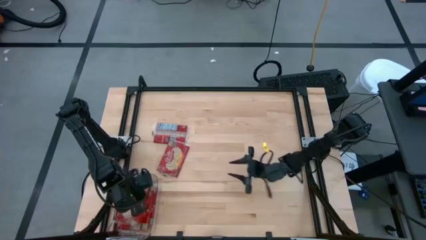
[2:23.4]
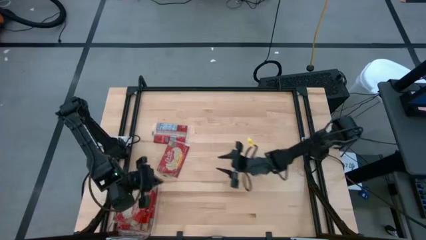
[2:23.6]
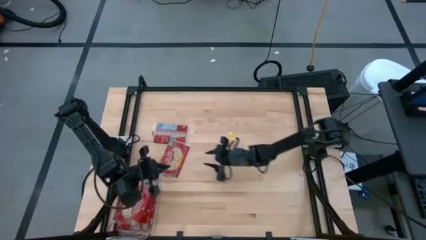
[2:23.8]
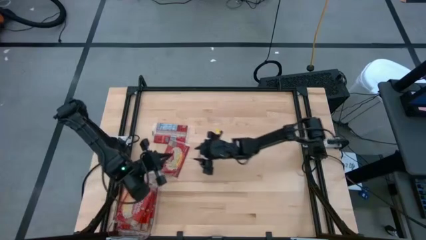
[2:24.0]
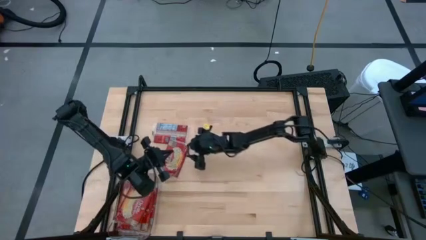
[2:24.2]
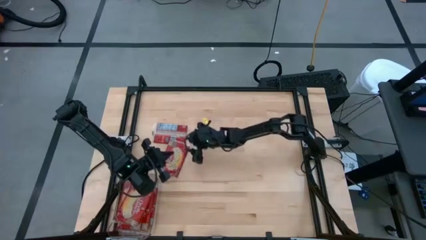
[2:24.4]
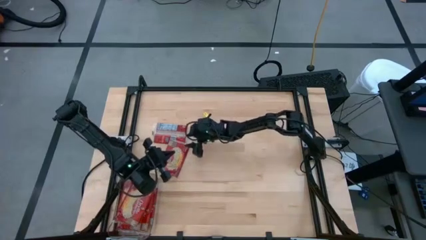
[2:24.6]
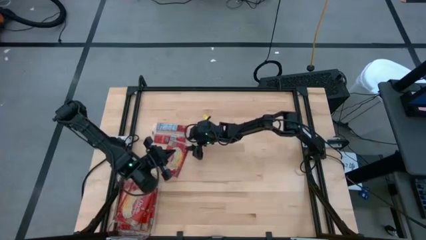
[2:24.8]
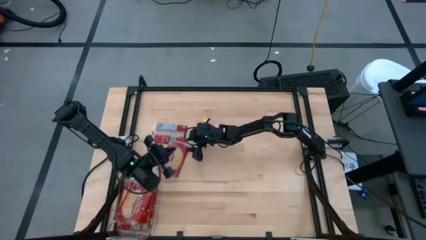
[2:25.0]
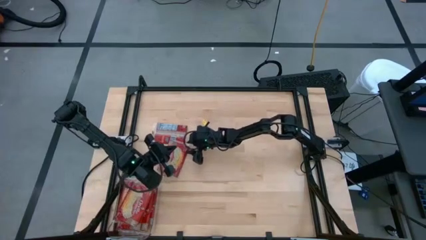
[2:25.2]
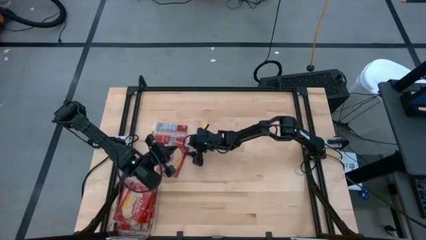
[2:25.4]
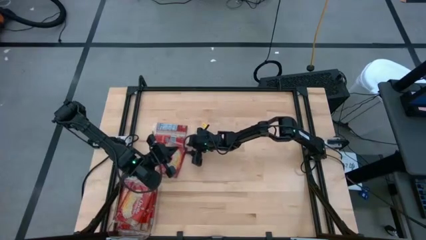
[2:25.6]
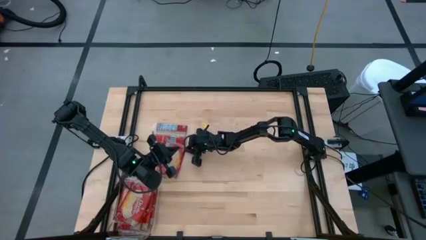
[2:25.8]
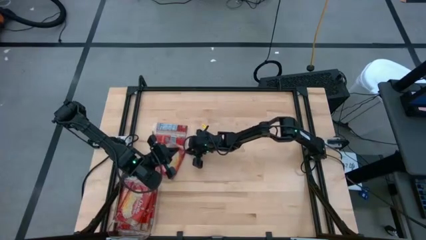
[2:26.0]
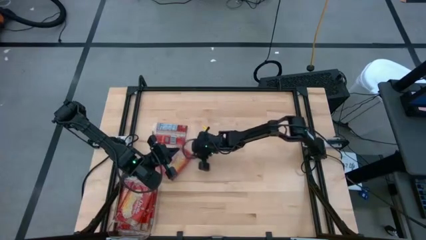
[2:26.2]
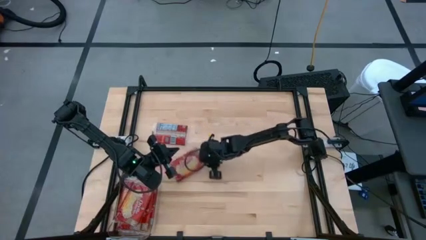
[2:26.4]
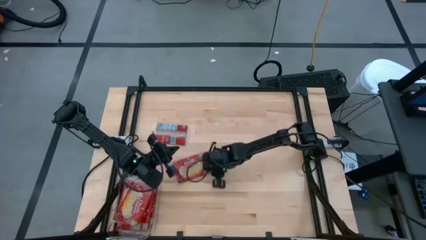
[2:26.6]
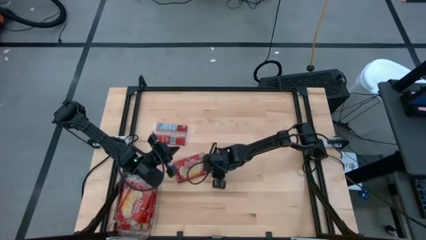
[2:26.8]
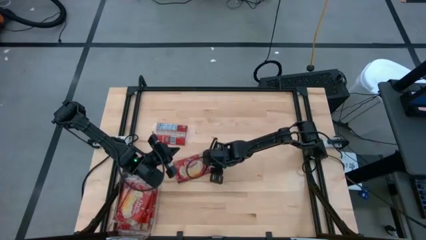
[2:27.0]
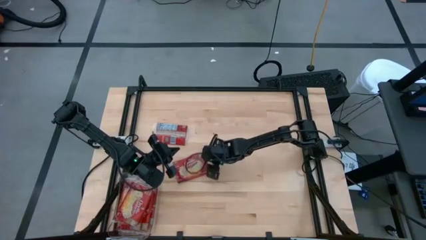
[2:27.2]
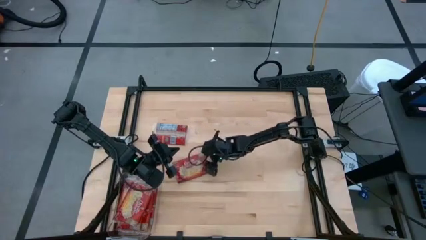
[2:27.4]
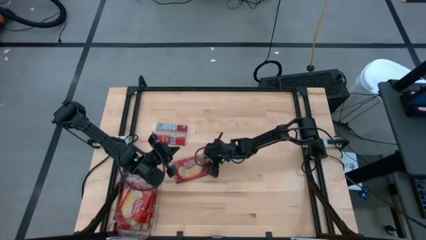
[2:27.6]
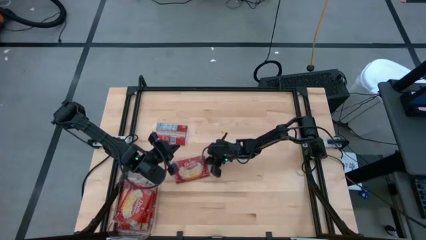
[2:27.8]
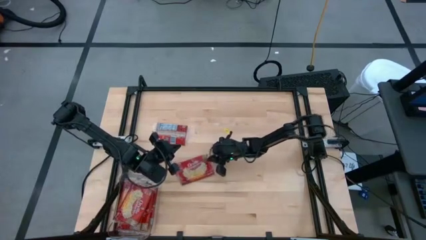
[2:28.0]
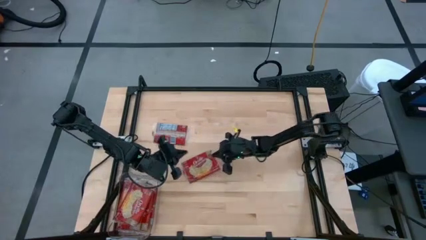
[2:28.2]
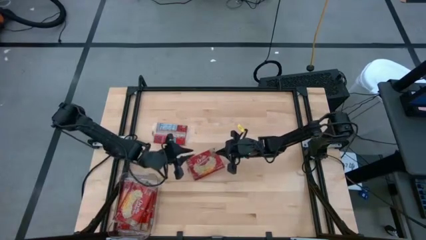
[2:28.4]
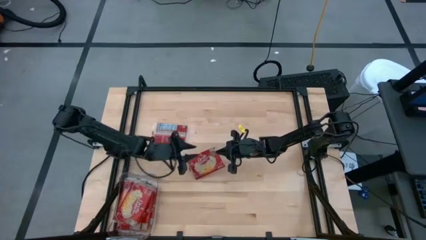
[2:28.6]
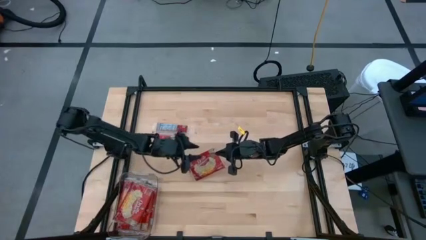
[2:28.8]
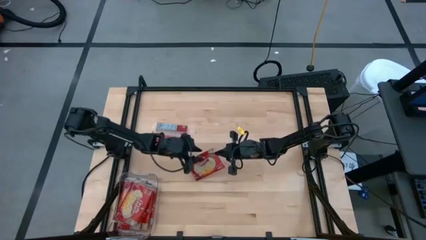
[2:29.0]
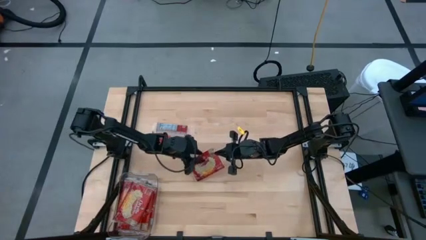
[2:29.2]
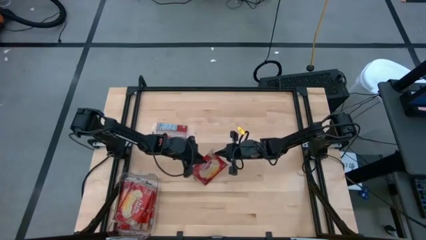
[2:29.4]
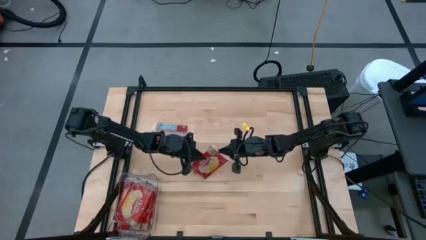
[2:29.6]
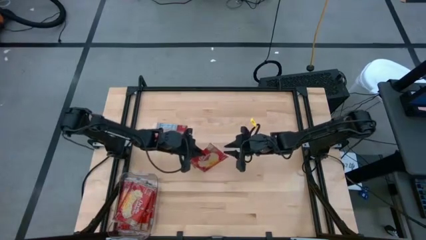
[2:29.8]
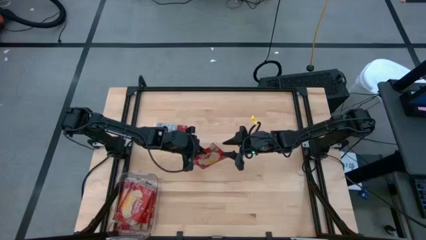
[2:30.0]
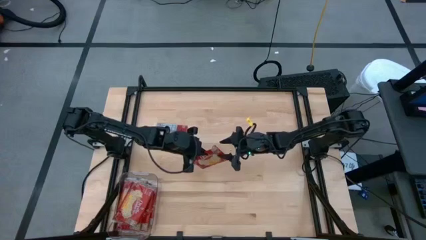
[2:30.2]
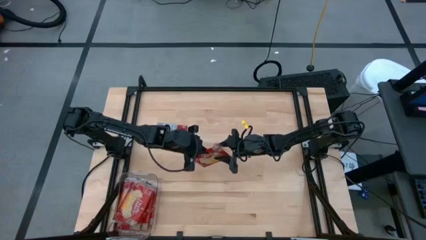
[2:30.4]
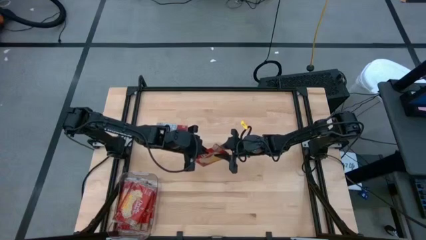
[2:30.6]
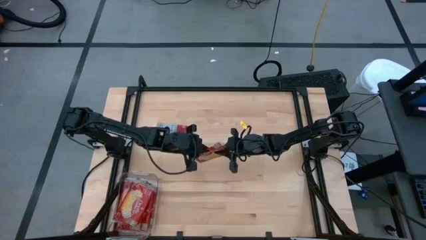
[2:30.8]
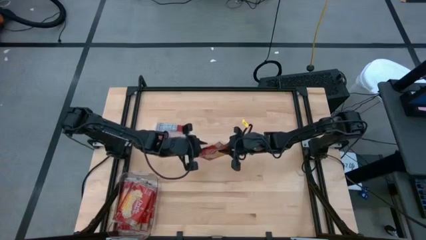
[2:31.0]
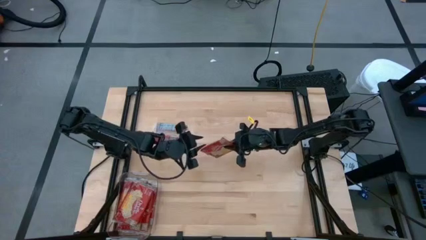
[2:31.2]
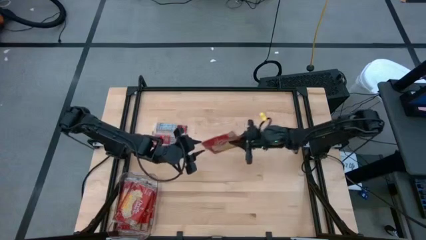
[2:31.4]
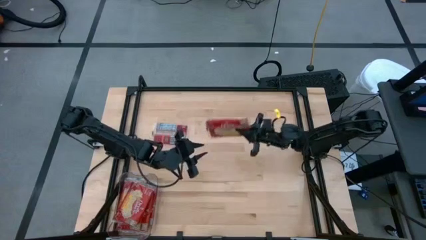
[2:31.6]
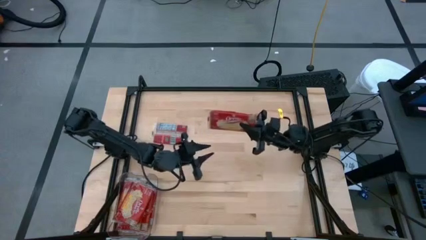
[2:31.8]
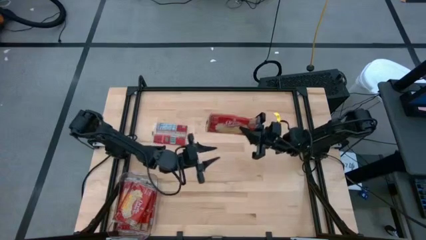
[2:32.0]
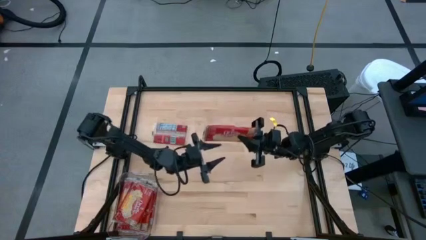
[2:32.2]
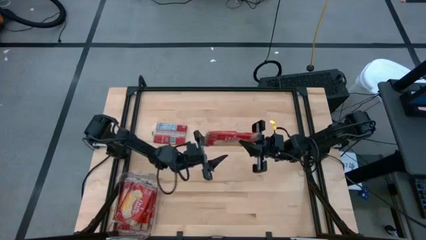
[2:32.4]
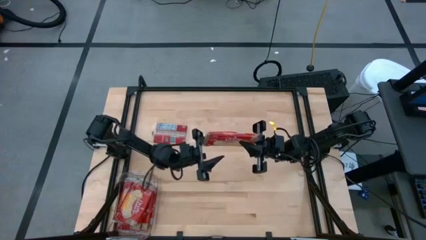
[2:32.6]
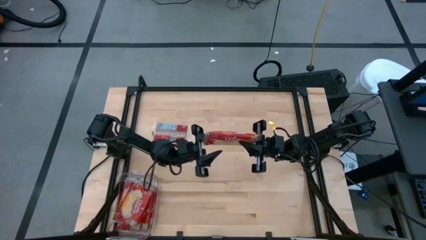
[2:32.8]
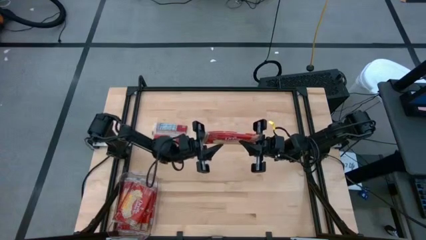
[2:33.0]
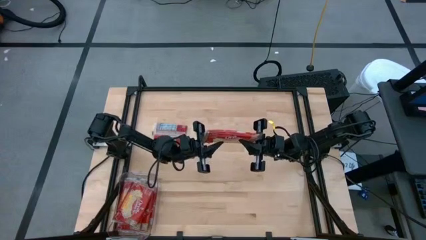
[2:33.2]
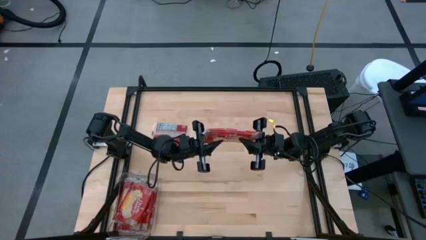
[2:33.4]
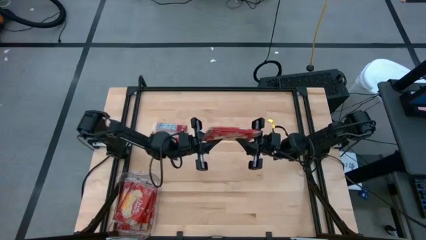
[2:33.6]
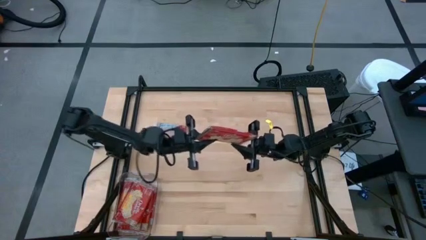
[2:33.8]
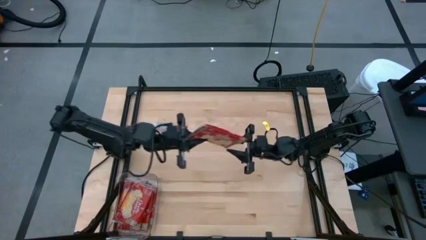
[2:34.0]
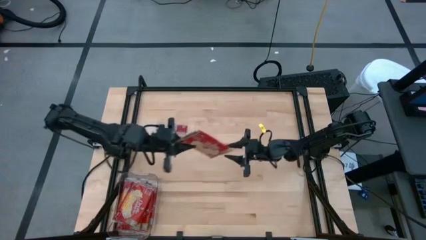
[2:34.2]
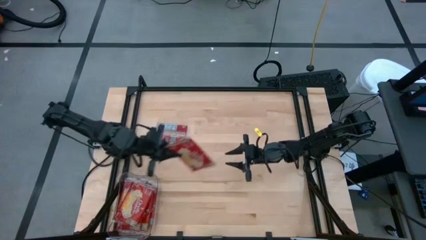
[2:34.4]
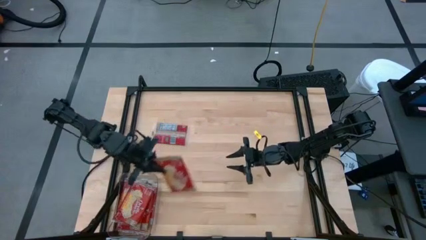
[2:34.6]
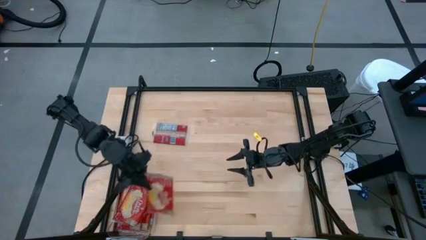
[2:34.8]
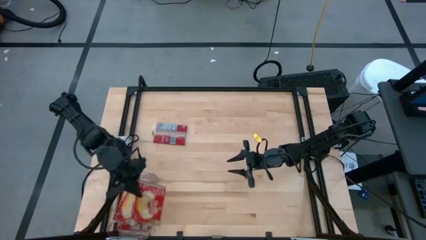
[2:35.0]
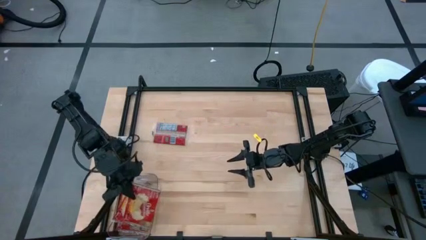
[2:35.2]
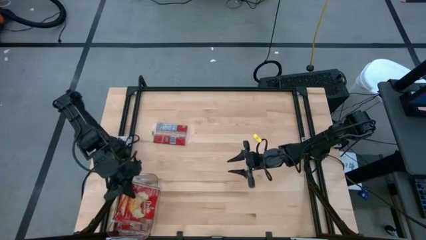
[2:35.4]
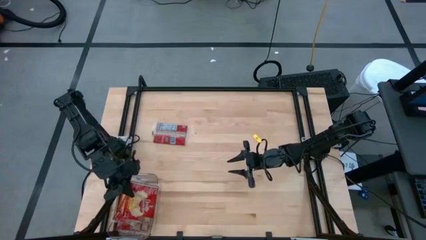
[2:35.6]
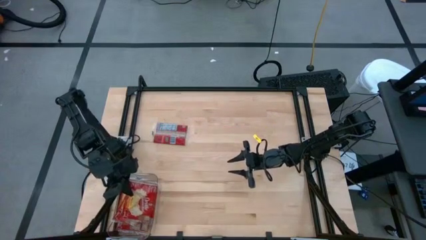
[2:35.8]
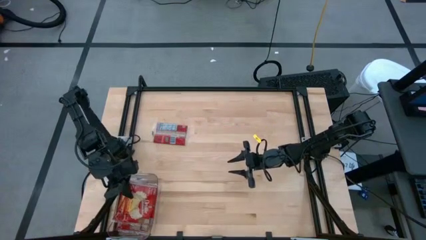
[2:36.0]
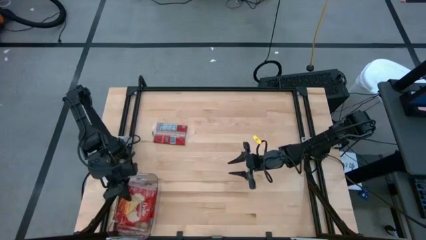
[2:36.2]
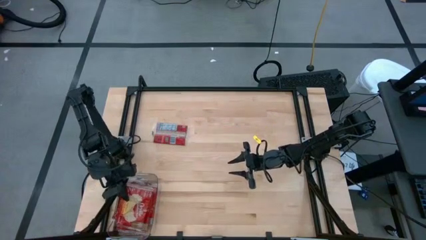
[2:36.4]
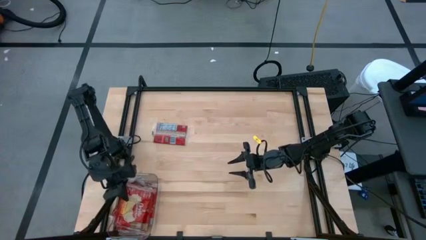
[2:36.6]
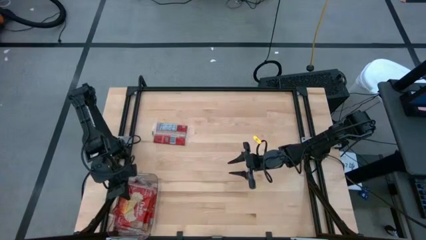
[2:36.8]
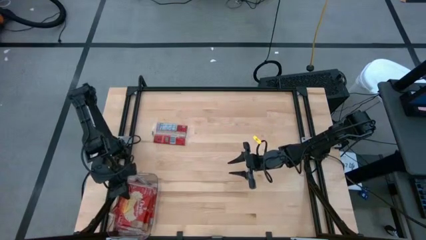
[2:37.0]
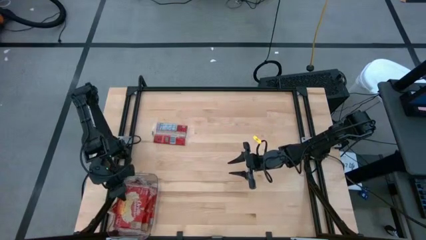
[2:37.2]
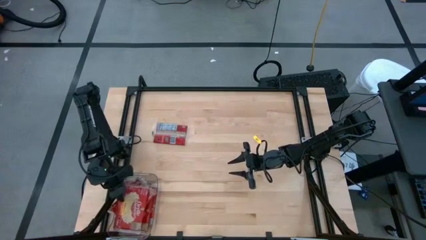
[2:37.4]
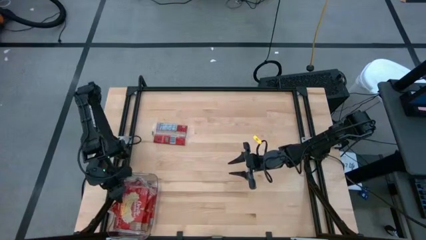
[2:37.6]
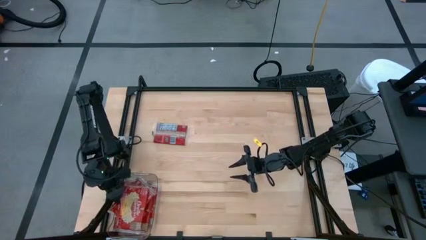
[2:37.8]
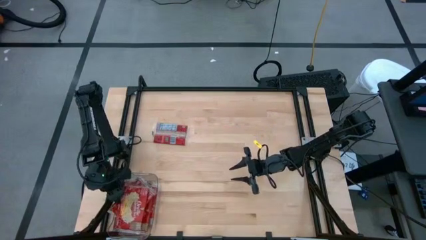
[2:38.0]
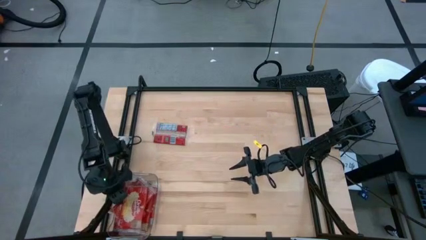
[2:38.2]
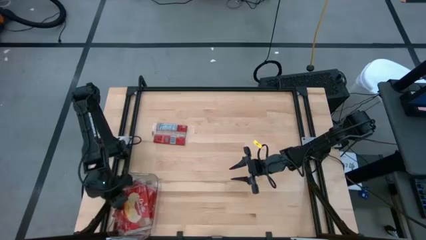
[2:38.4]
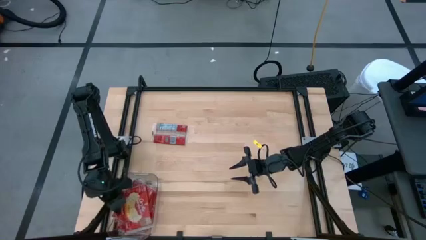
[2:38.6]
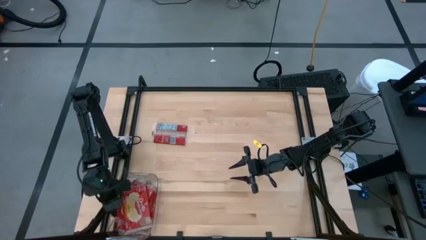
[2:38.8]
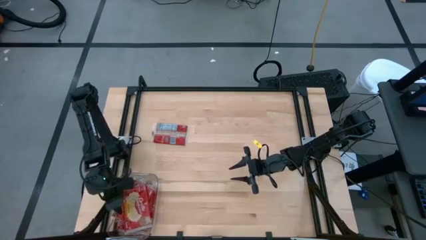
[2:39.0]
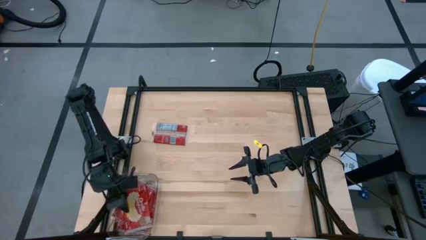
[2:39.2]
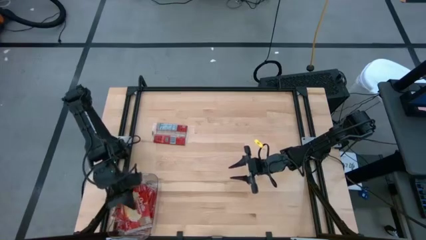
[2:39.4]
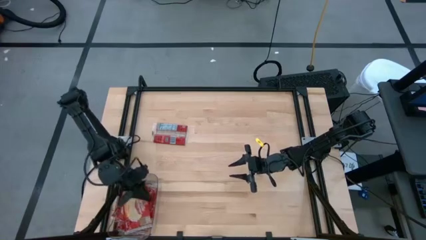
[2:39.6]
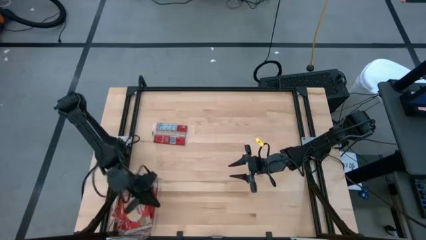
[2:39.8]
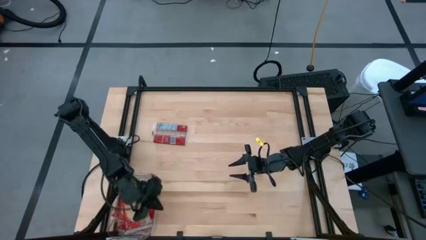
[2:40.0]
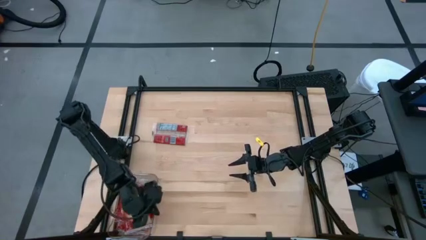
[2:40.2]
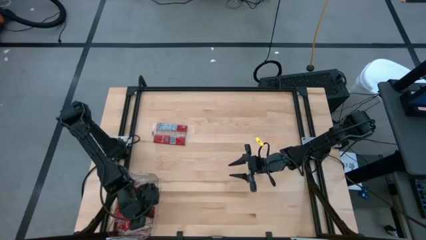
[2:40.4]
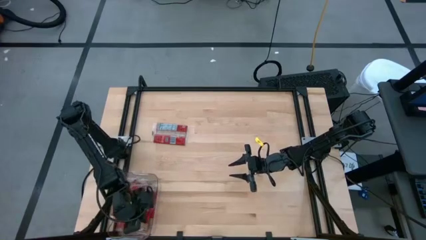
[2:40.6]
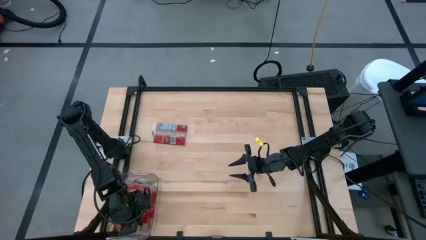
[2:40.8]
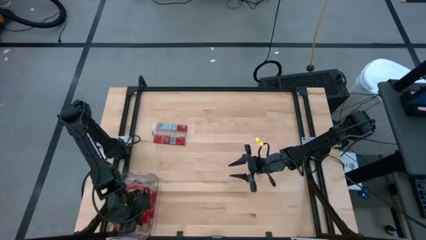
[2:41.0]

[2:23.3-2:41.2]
Task: Sort popcorn bags into baskets
Put the popcorn bag into the transparent bin
